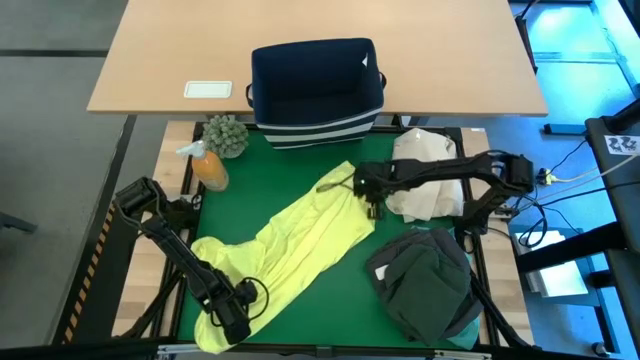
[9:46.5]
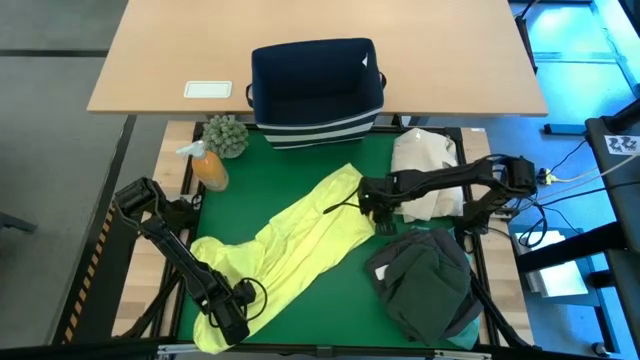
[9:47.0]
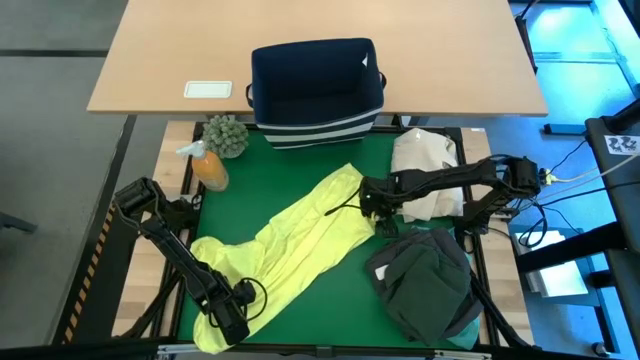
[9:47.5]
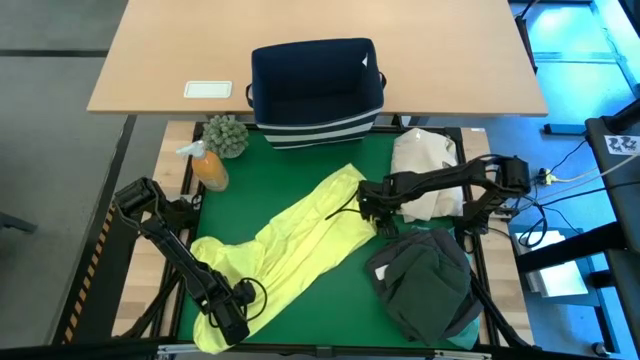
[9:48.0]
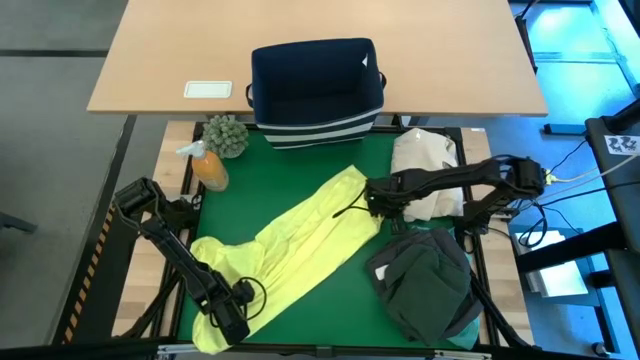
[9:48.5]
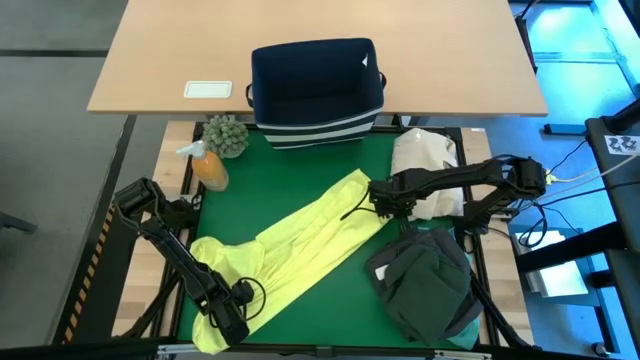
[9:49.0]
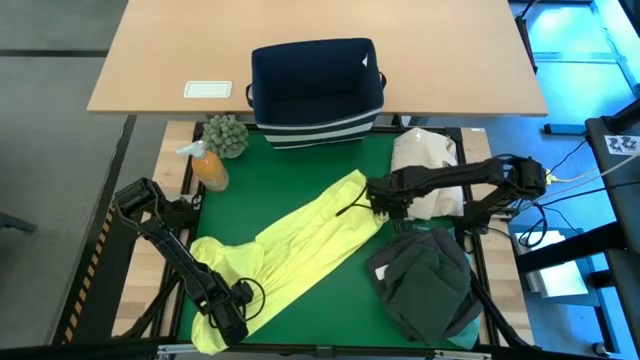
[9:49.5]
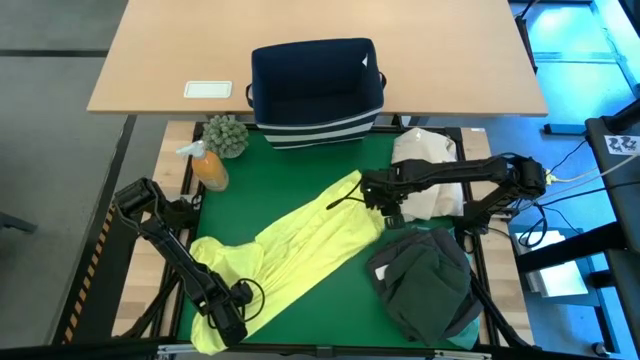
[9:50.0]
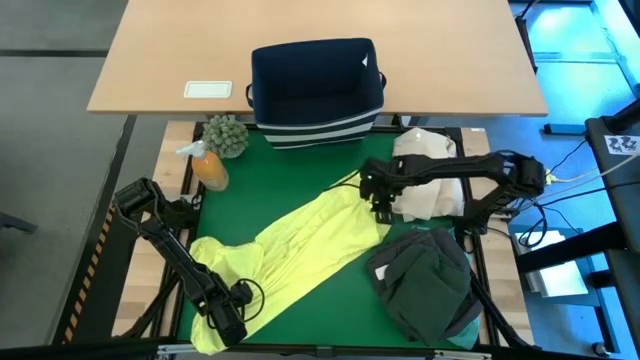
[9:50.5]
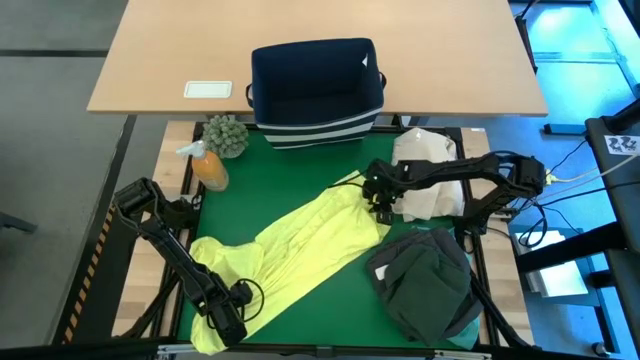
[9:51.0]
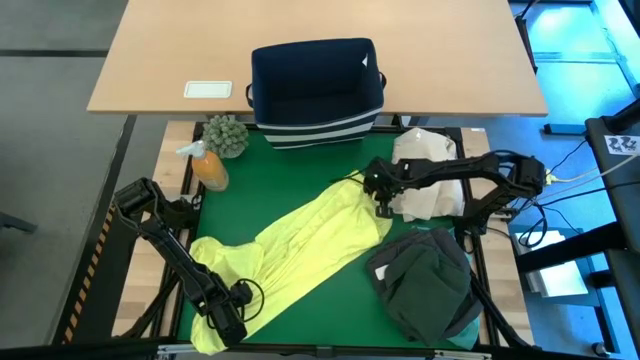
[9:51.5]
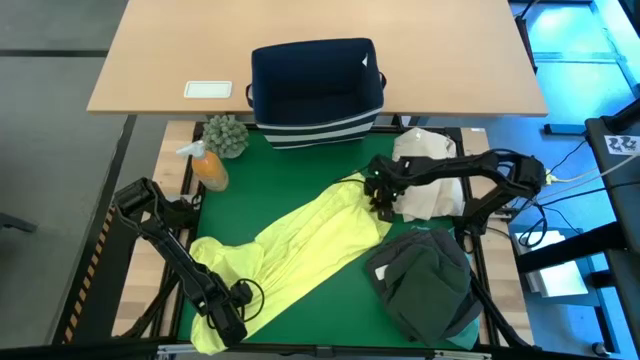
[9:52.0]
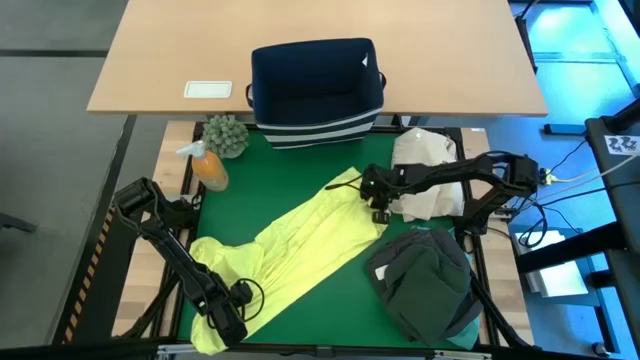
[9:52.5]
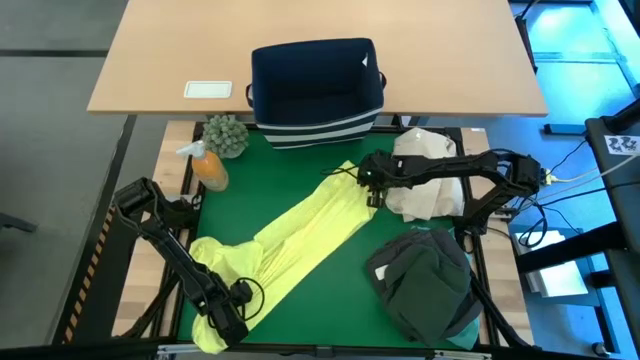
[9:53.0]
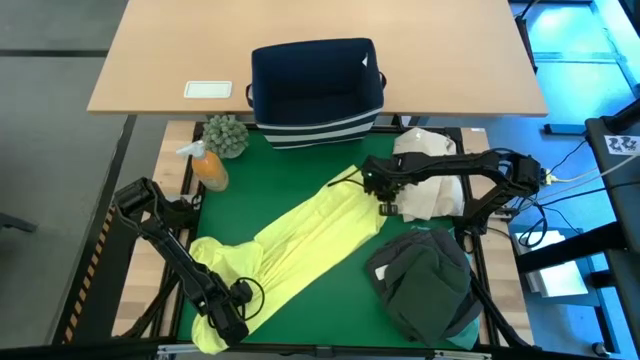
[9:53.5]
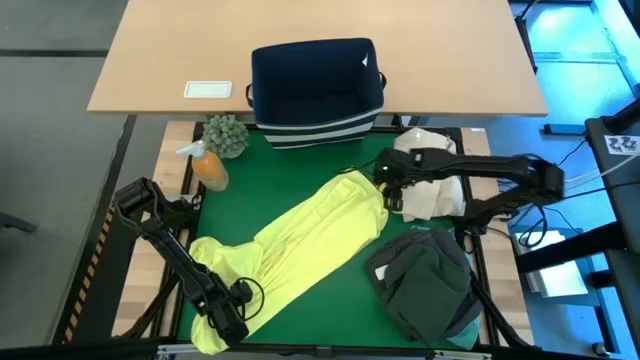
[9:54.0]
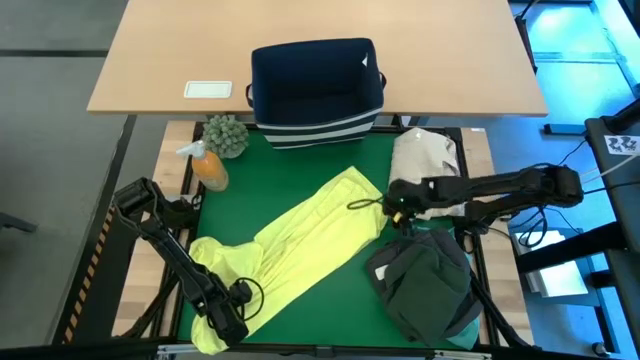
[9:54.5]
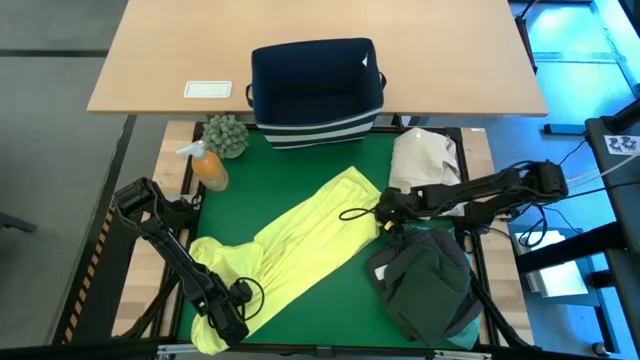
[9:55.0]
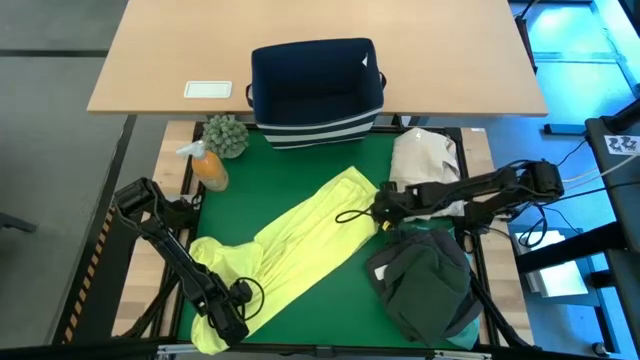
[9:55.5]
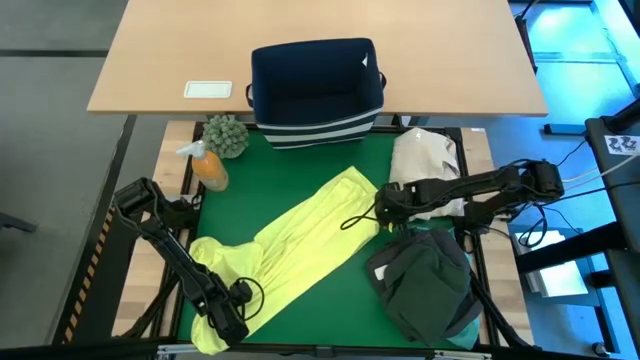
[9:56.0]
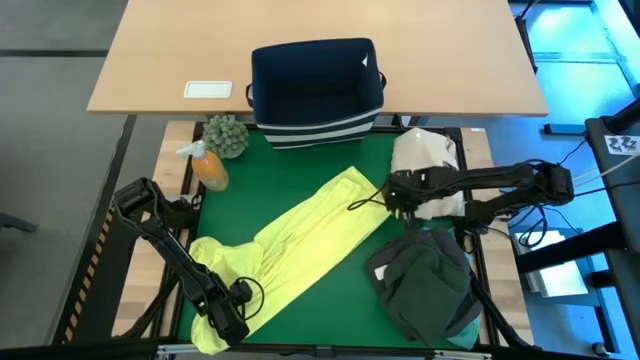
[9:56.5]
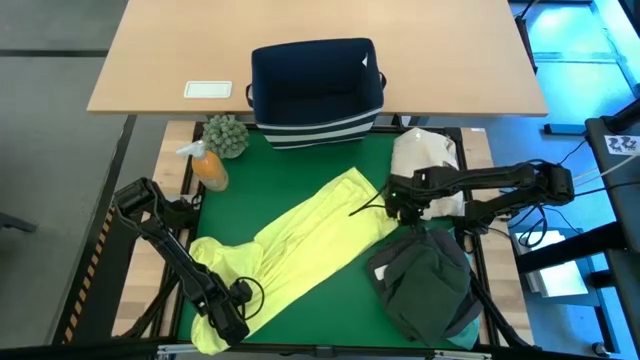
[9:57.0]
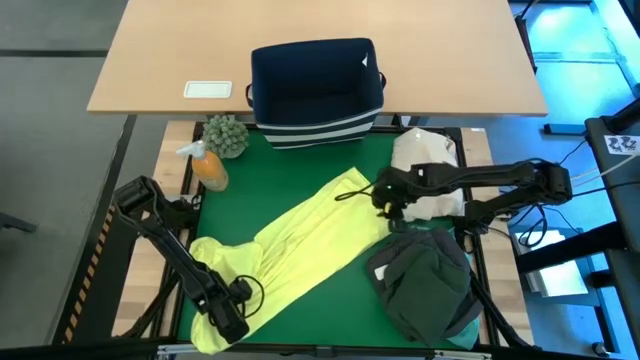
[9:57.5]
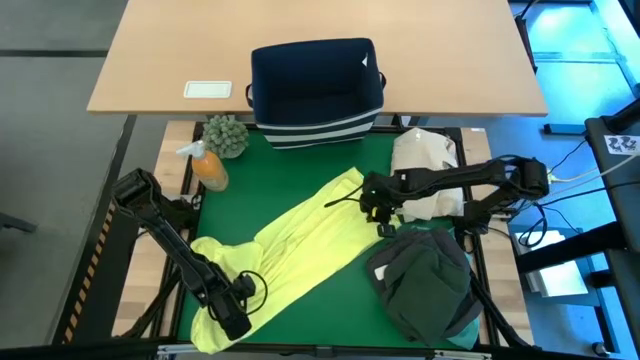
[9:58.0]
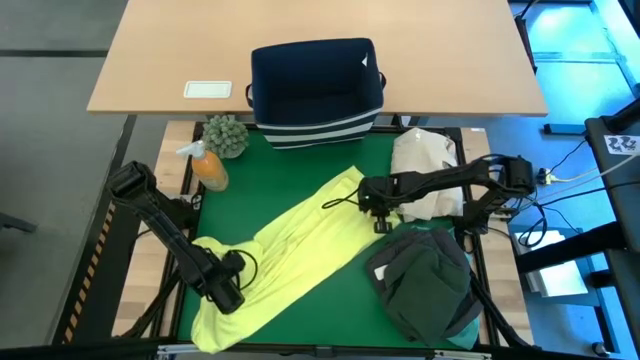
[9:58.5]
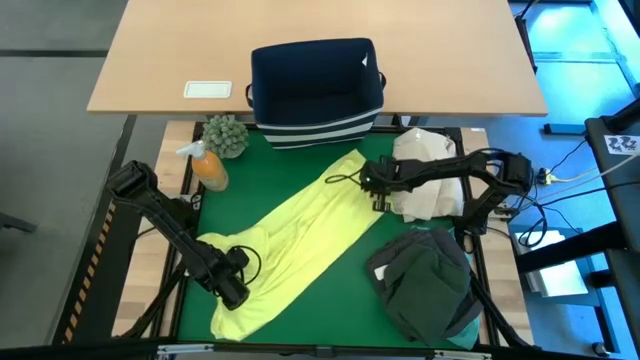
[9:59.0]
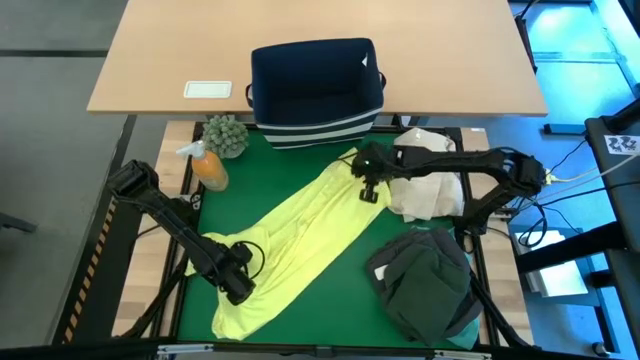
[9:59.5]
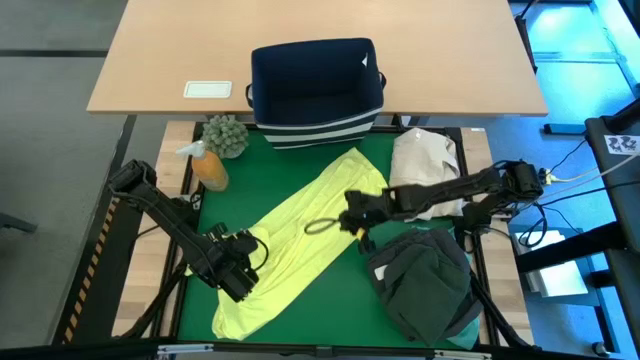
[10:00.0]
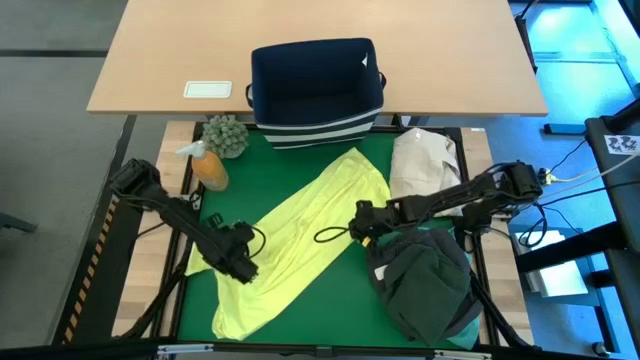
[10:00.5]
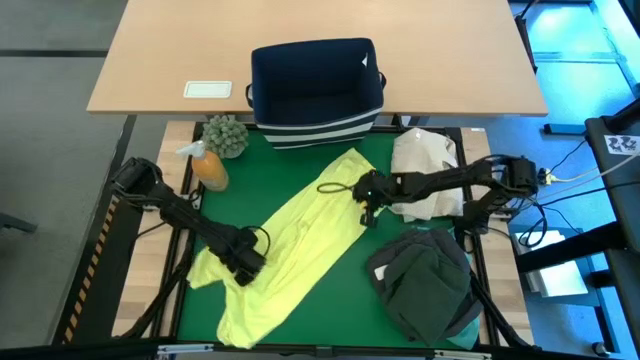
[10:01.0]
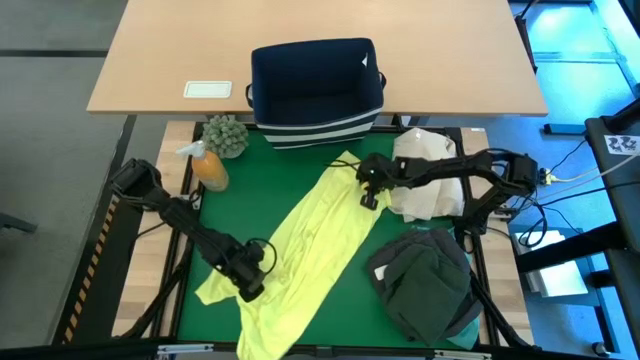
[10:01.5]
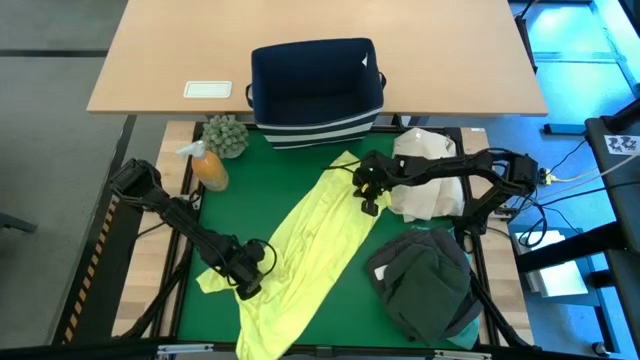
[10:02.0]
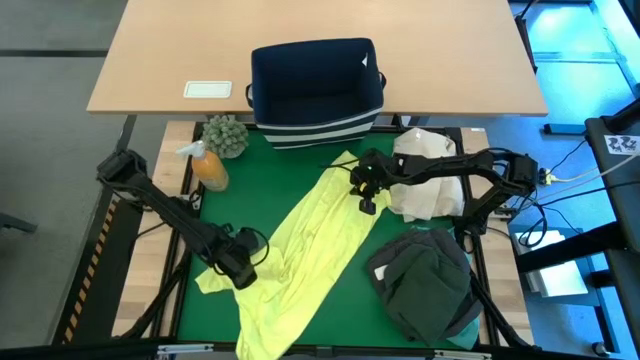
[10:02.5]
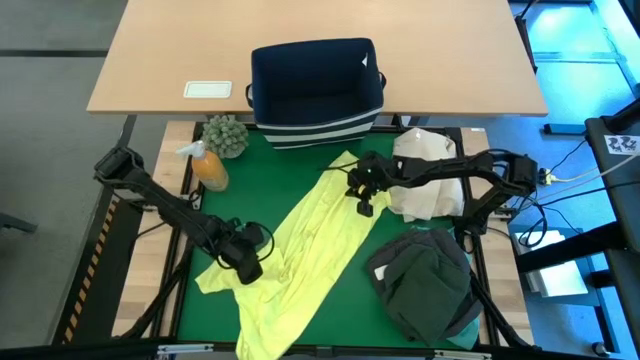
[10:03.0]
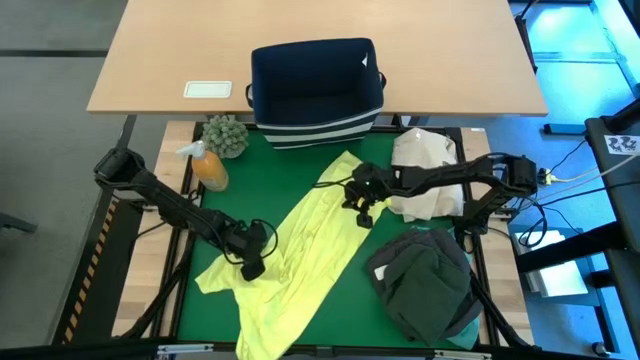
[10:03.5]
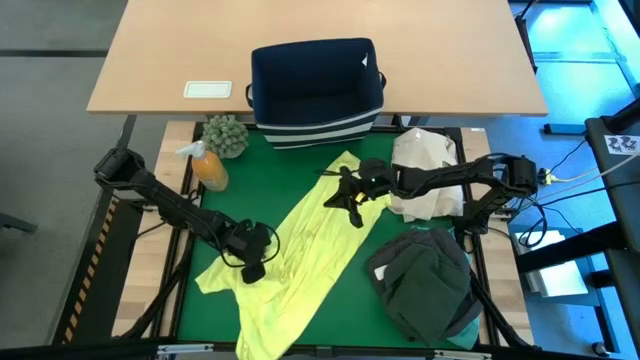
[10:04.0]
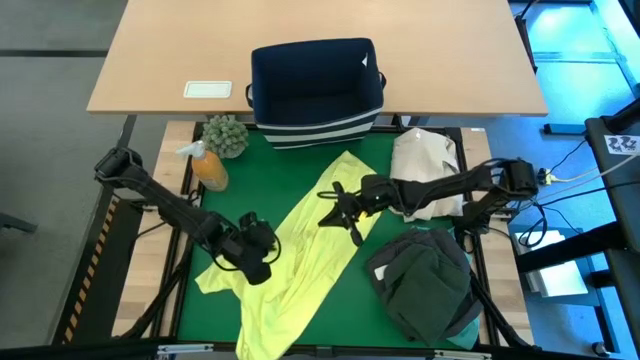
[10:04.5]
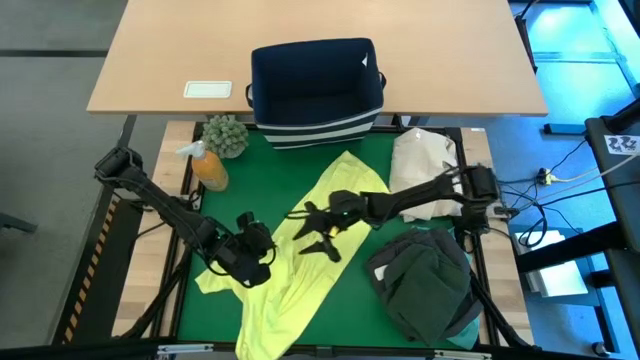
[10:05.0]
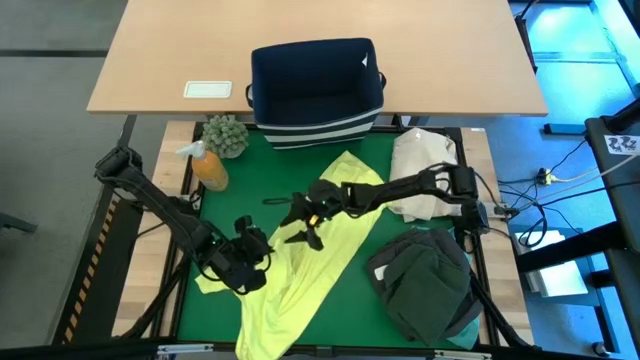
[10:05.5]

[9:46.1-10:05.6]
Task: Fold laundry
Fold the yellow shirt on the table
